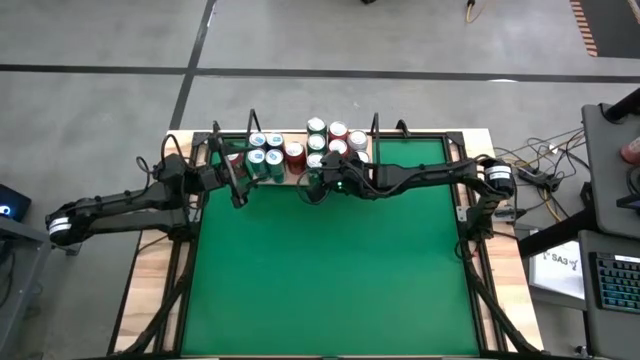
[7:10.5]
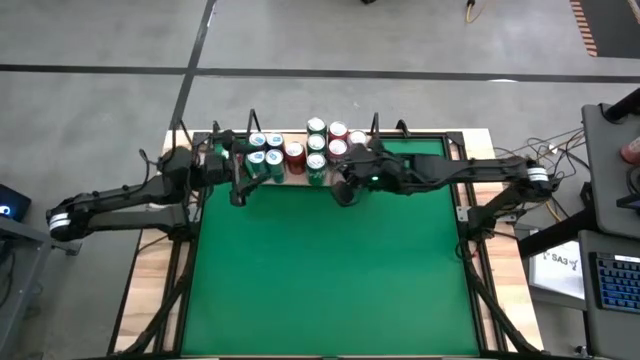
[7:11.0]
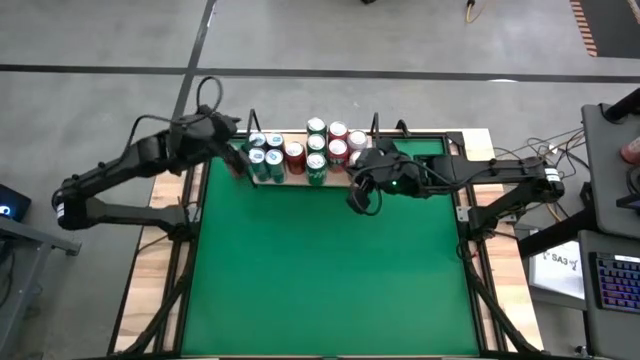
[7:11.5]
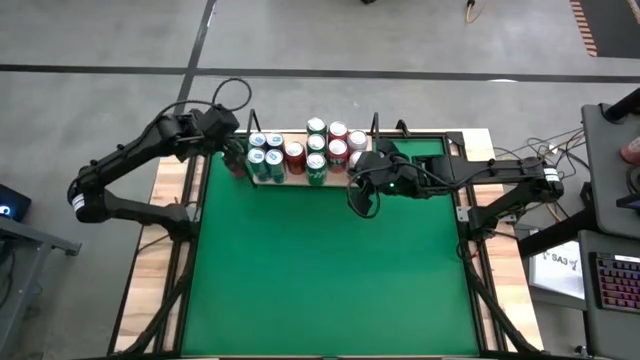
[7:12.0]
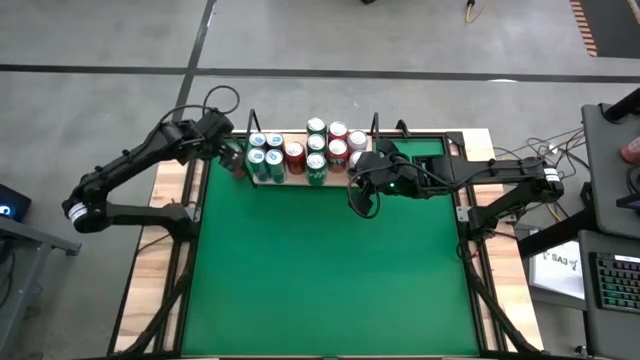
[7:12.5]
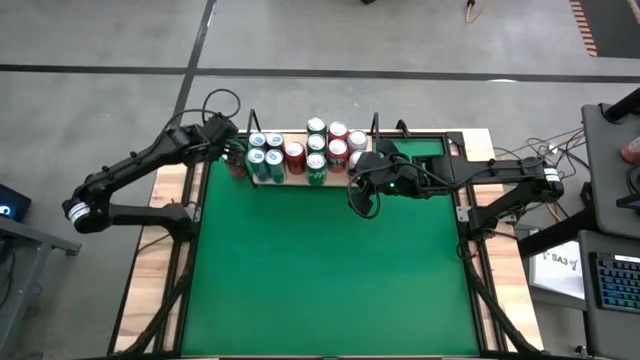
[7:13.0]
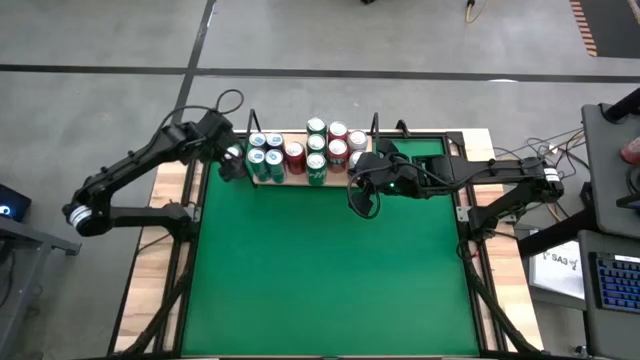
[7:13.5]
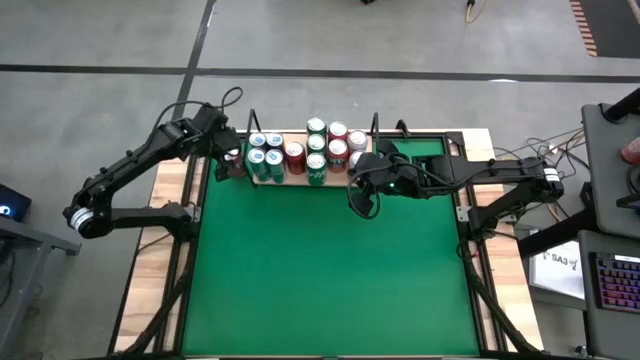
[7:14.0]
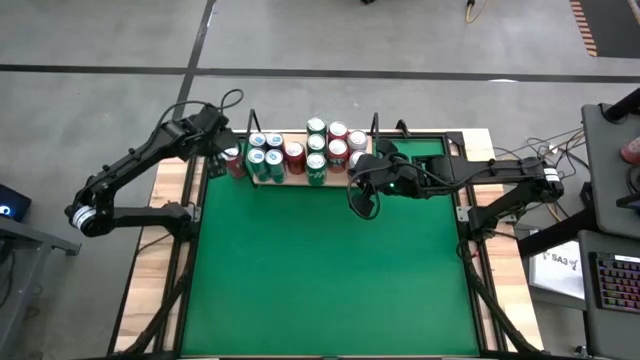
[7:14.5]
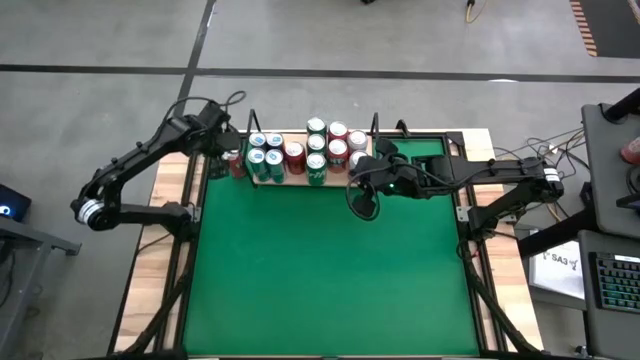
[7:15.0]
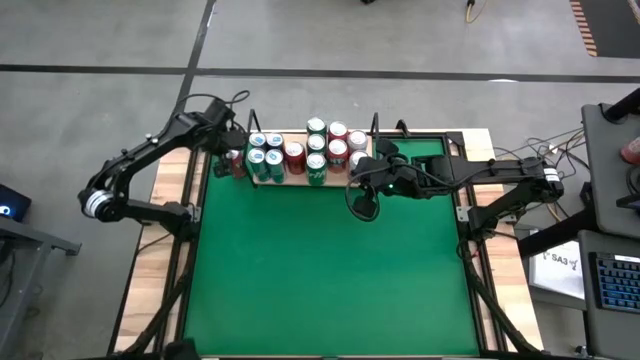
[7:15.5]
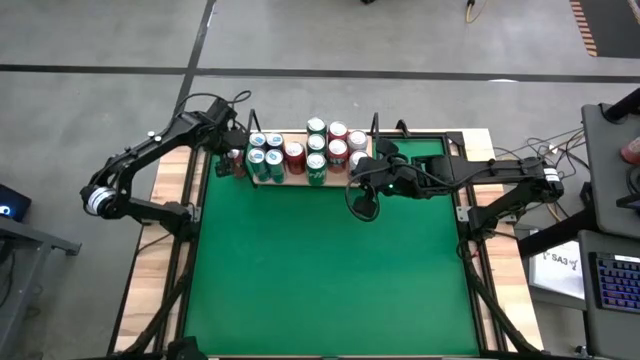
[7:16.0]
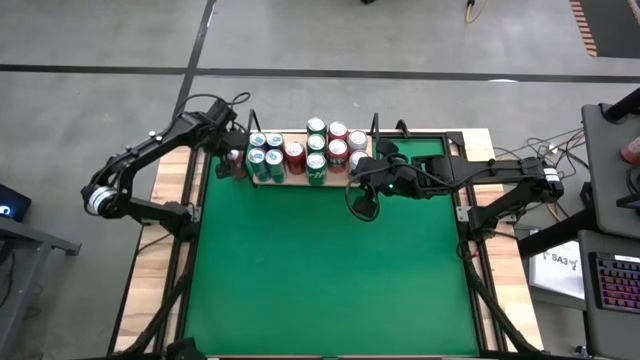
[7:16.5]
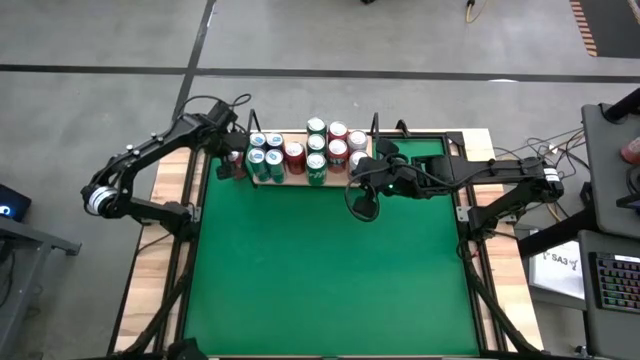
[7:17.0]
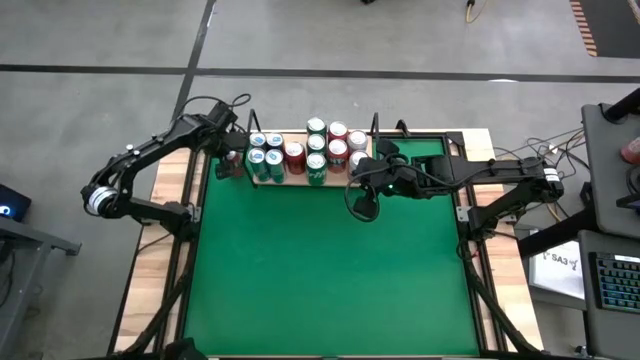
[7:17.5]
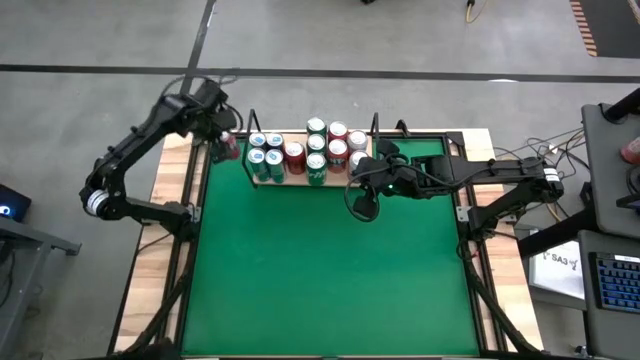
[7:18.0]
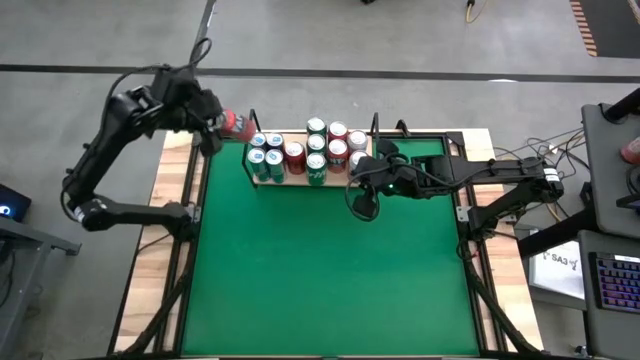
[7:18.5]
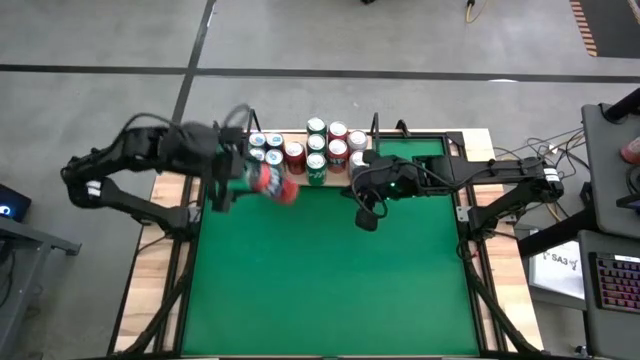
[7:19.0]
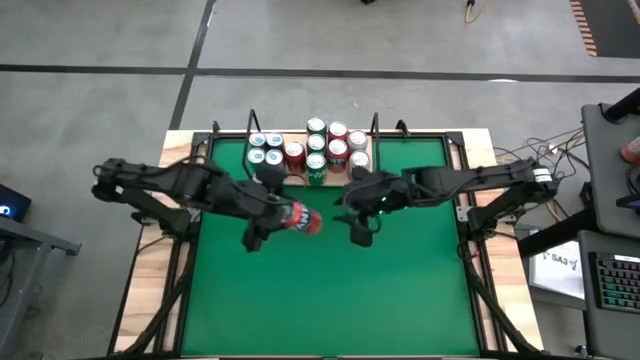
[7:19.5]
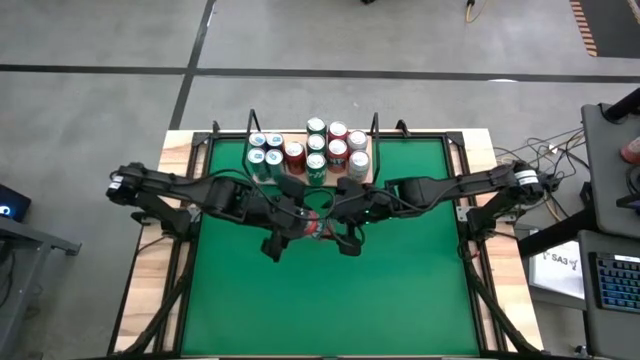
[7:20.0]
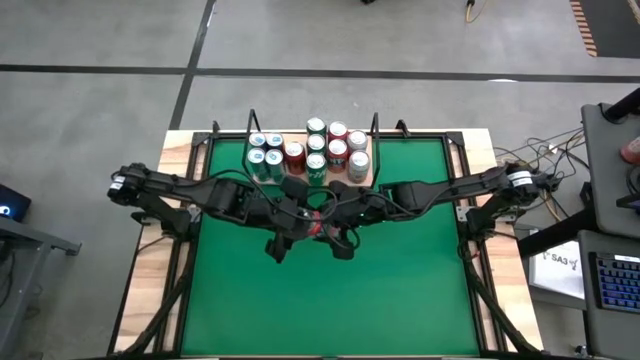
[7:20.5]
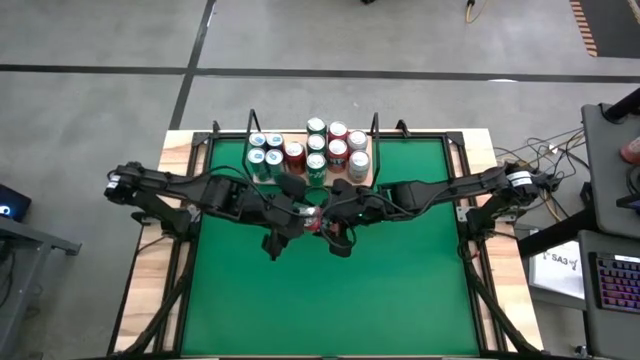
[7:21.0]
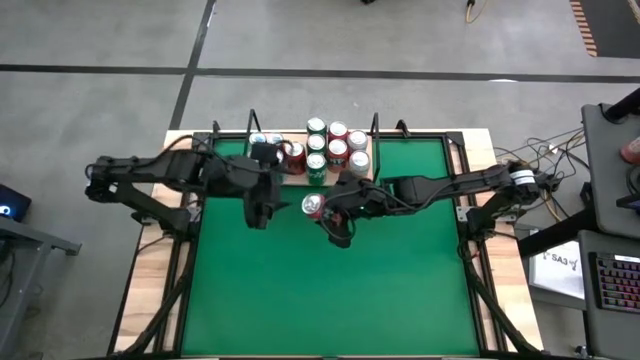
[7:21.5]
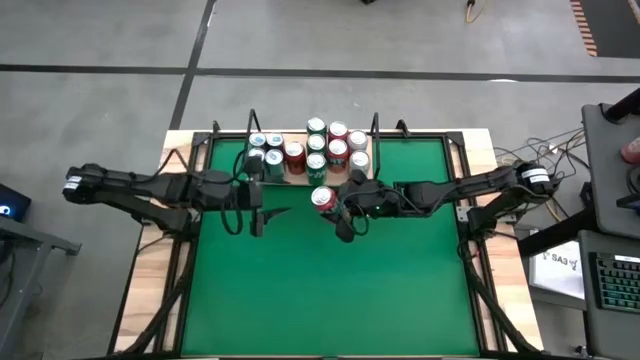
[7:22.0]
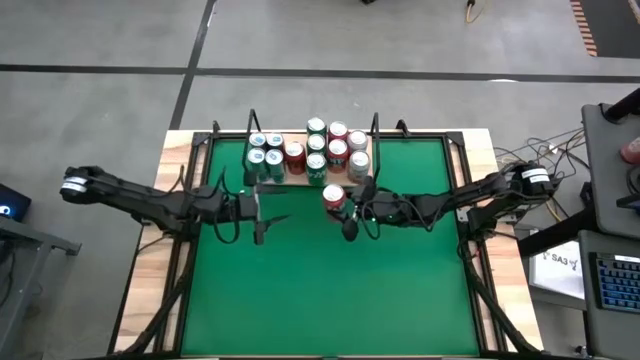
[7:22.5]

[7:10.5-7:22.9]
Task: Pick and place cans onto a shelf
Put the orange soda can on the shelf aligned with the other orange soda can

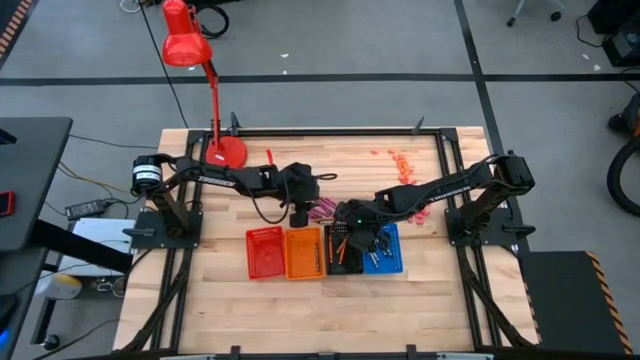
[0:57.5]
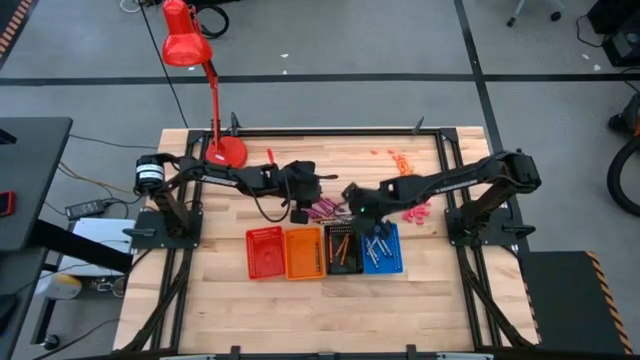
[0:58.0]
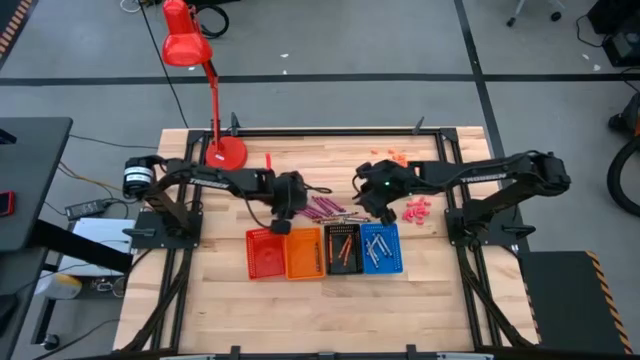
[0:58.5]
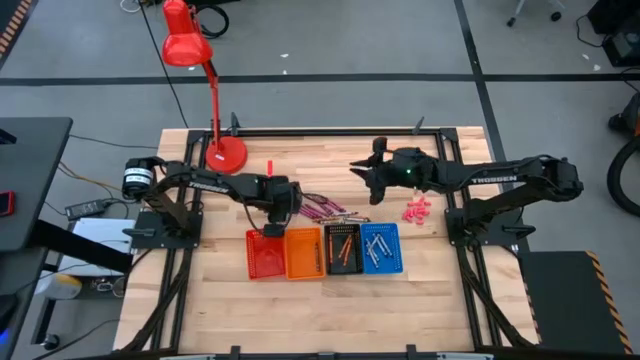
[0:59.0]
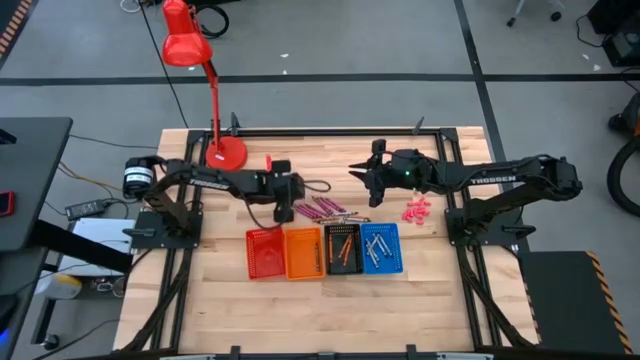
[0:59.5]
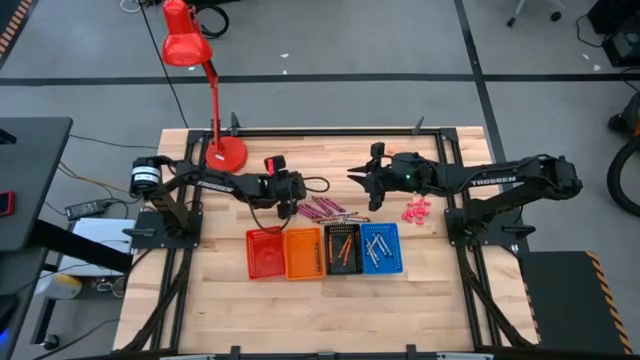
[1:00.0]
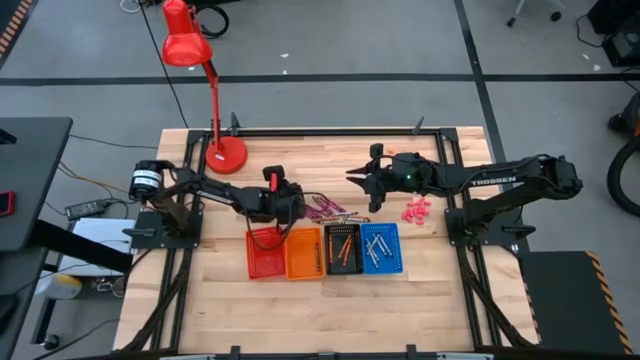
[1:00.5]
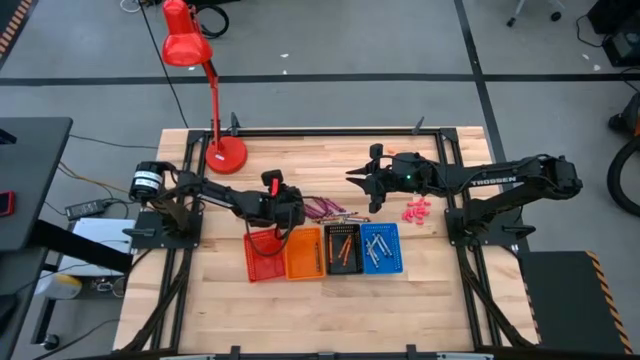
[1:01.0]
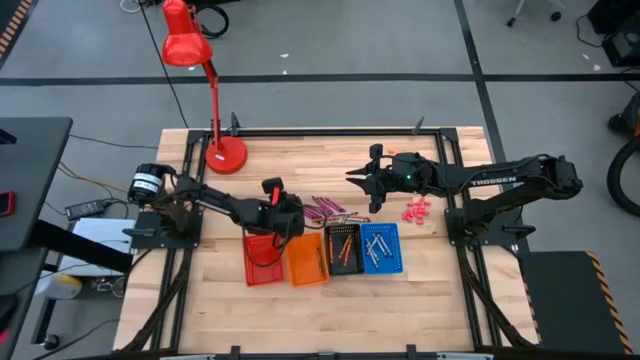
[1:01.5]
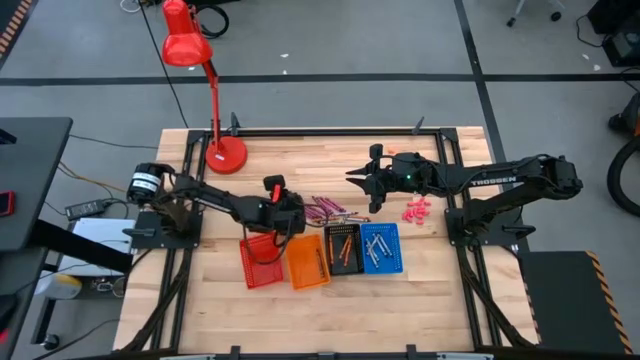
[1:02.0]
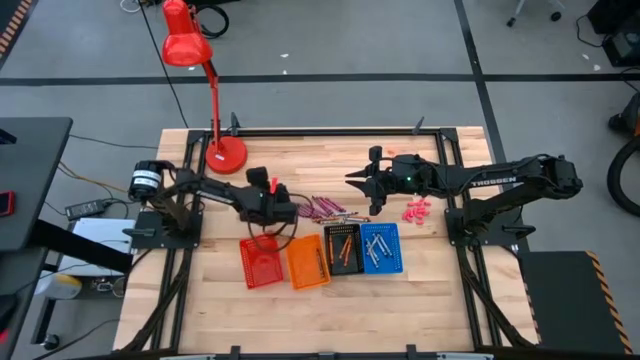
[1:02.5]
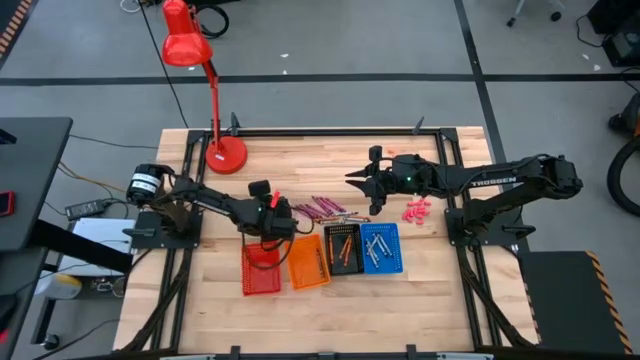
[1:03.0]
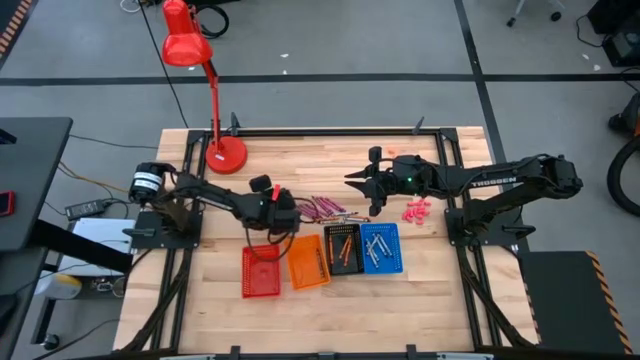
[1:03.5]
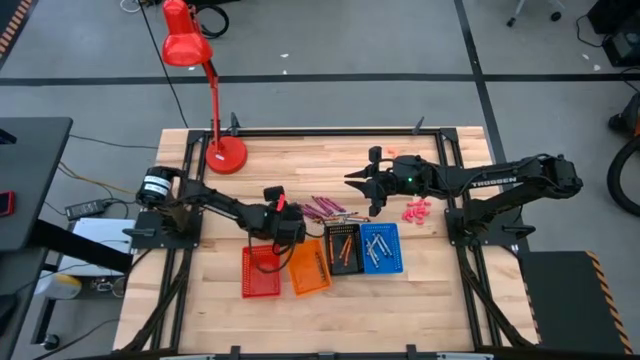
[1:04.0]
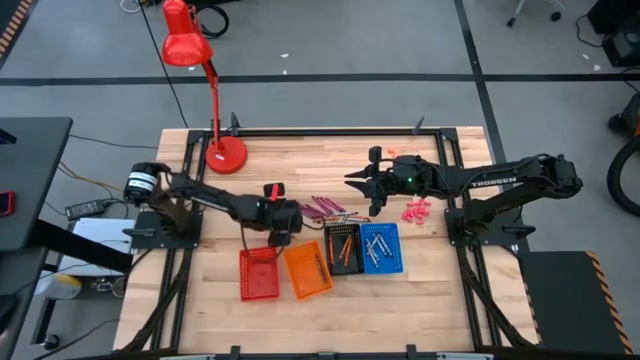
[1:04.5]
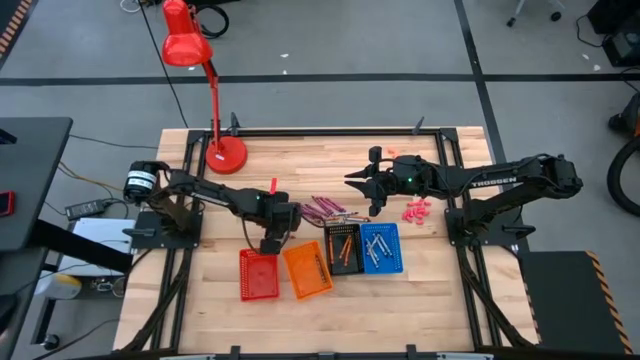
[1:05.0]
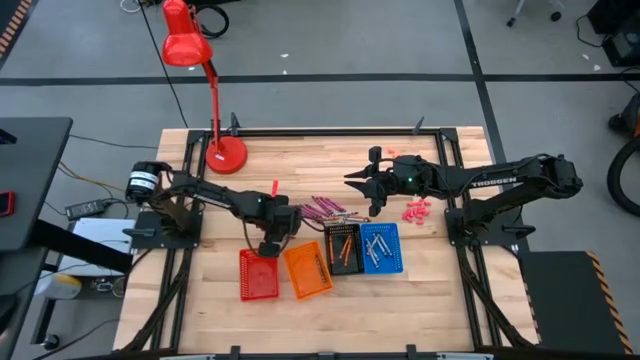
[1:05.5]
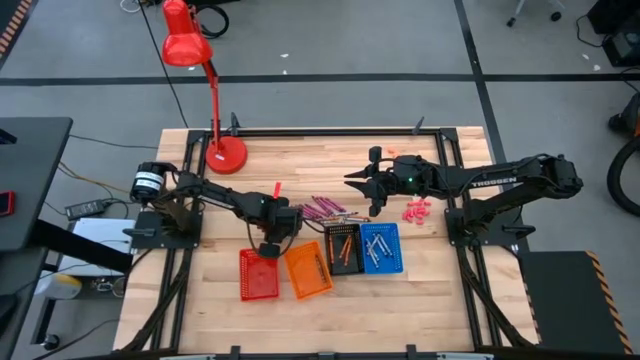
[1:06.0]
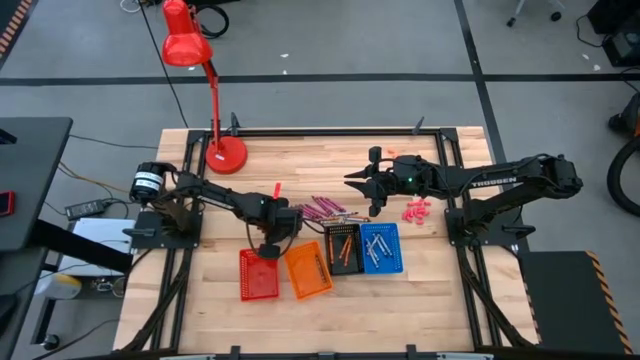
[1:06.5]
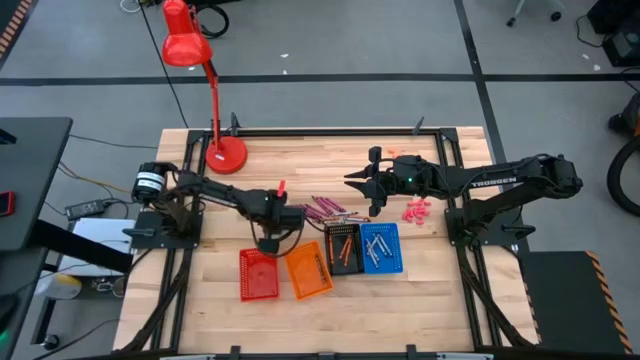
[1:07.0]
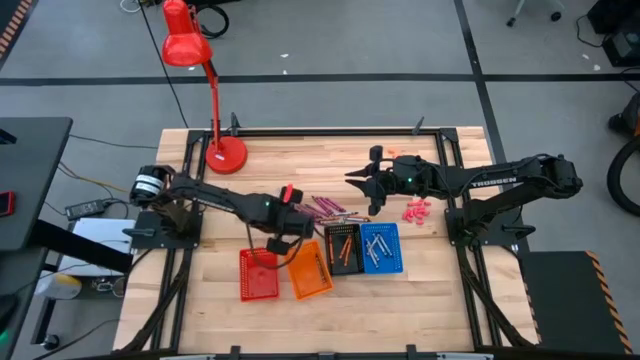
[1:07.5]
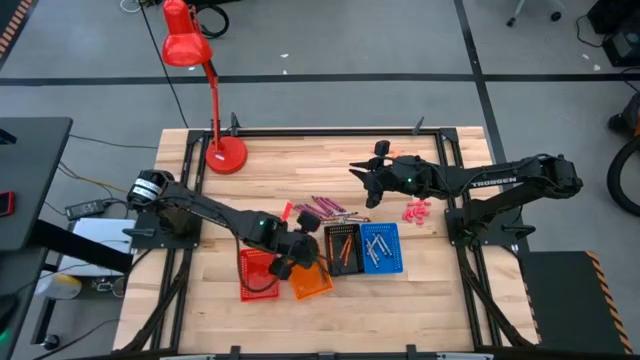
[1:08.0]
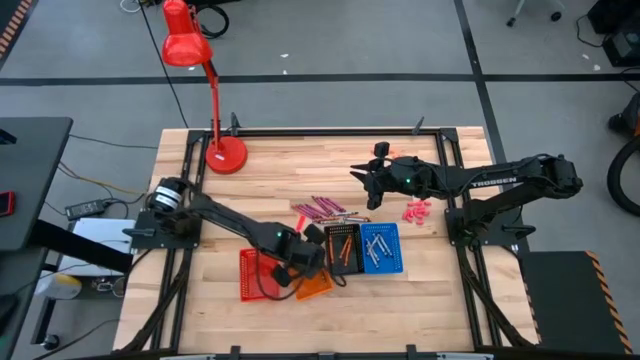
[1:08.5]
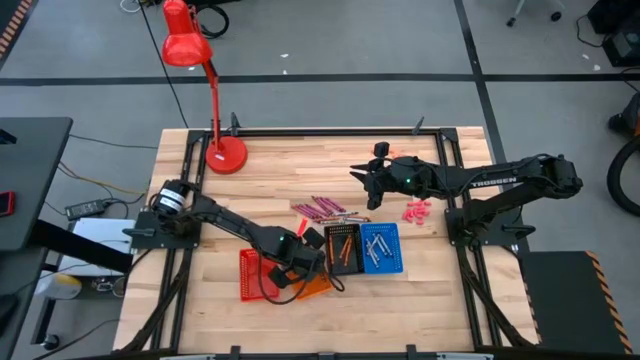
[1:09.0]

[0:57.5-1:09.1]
Task: Sort crayons
Put the brown crayon into the orange bin
